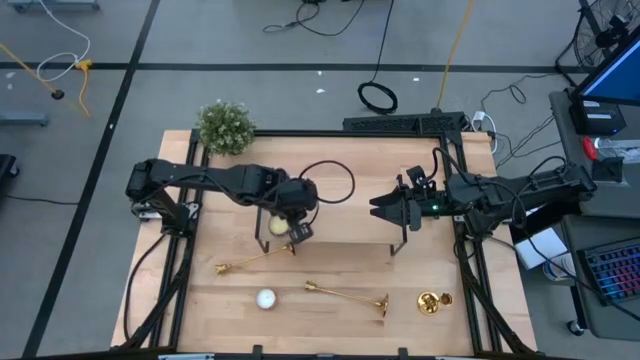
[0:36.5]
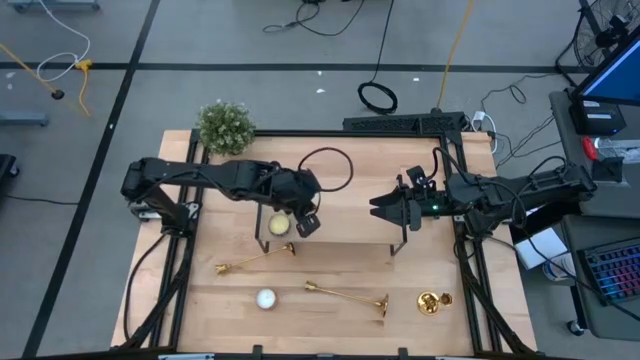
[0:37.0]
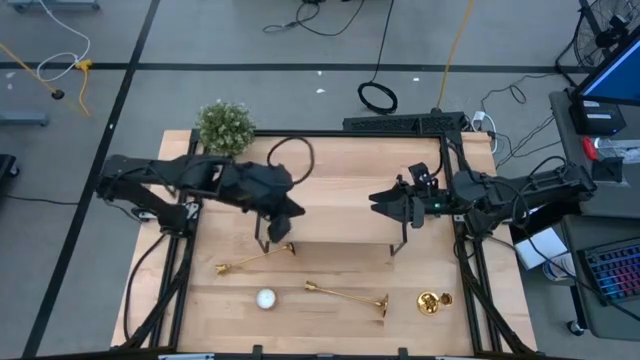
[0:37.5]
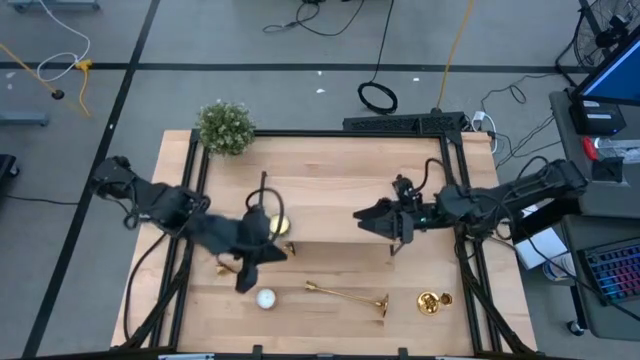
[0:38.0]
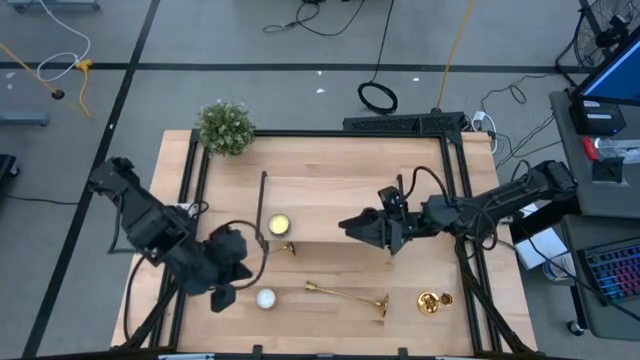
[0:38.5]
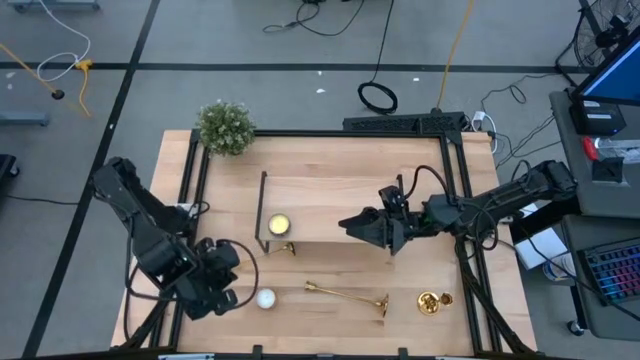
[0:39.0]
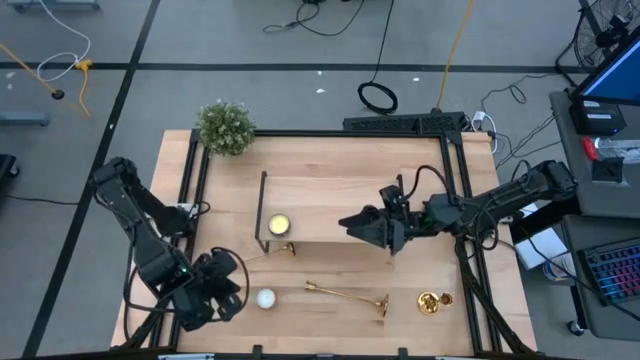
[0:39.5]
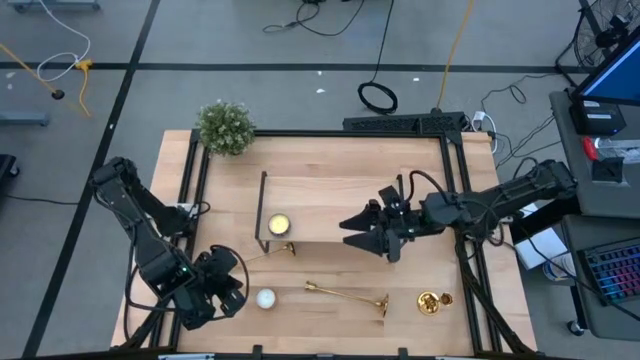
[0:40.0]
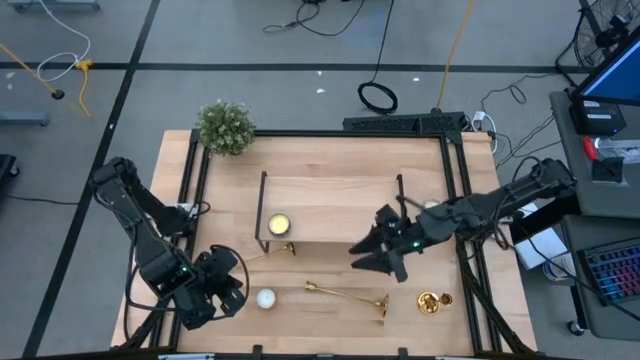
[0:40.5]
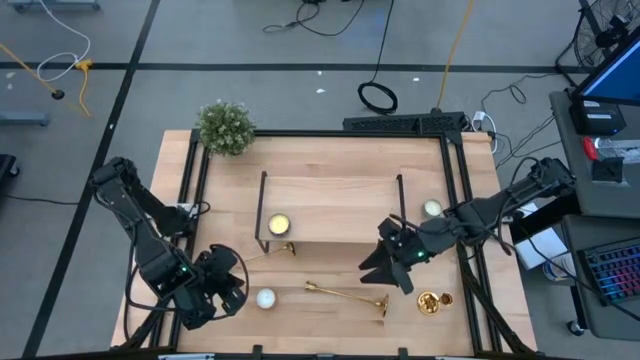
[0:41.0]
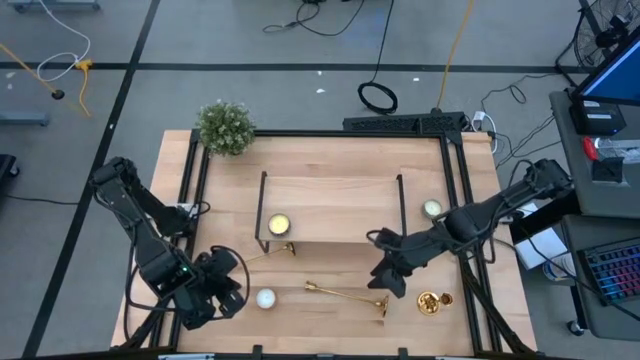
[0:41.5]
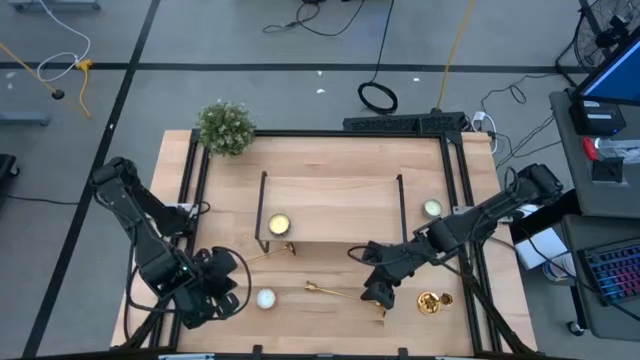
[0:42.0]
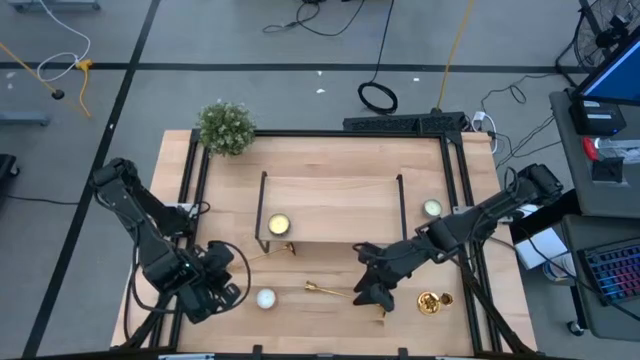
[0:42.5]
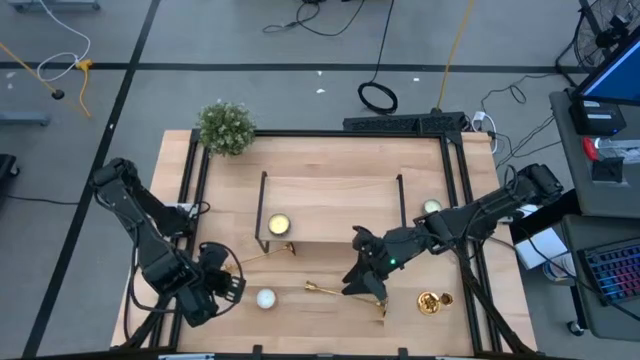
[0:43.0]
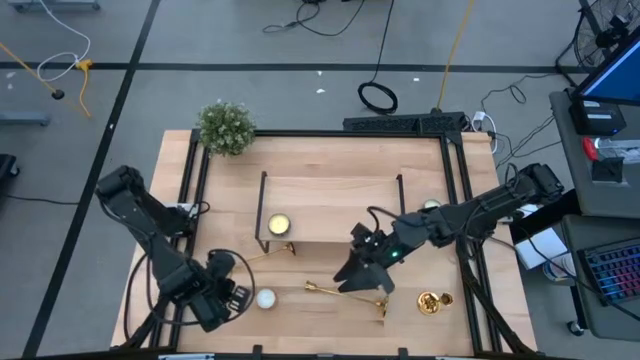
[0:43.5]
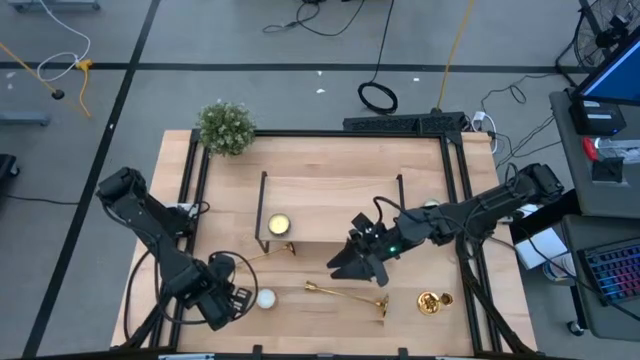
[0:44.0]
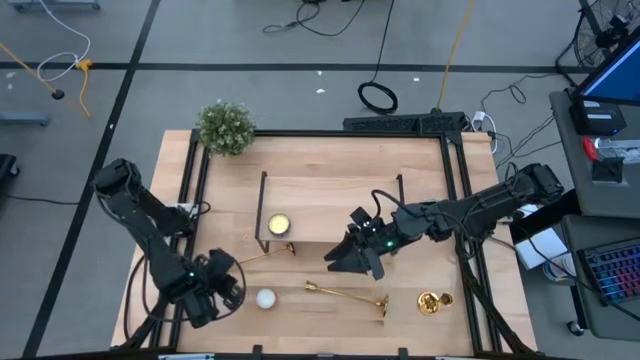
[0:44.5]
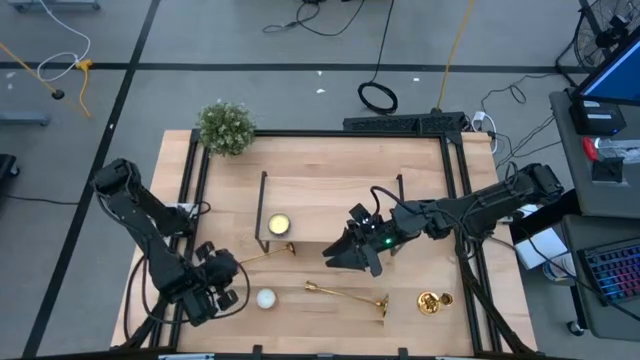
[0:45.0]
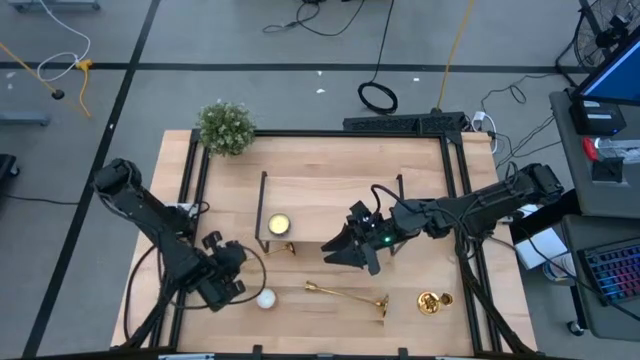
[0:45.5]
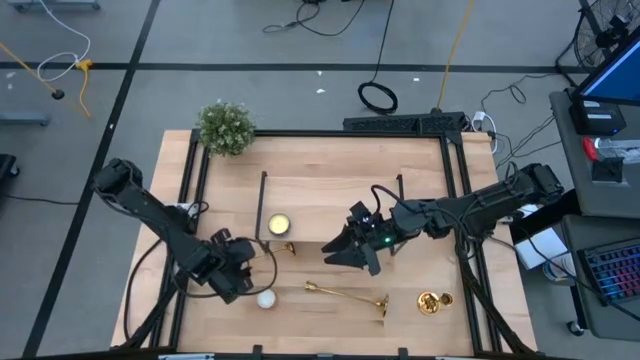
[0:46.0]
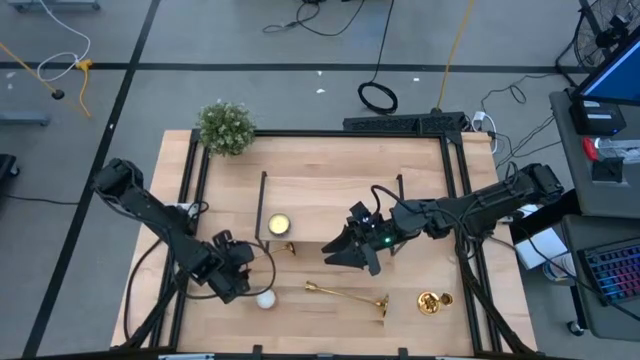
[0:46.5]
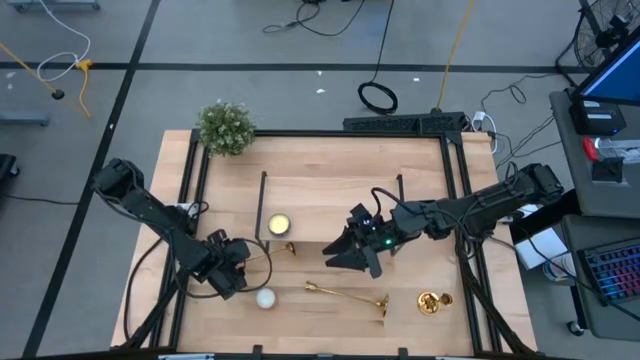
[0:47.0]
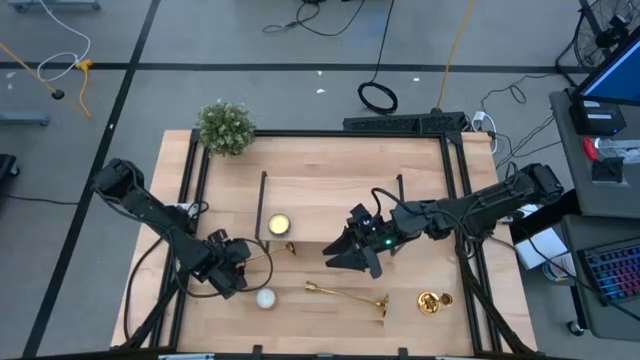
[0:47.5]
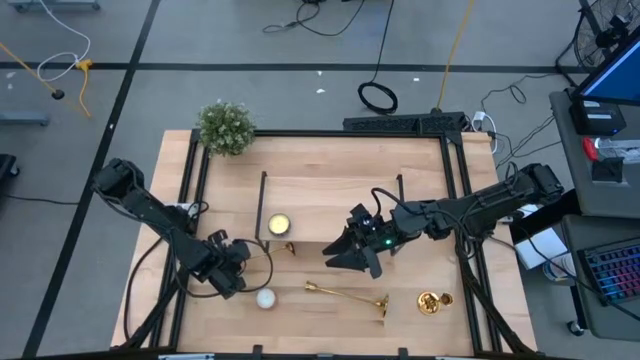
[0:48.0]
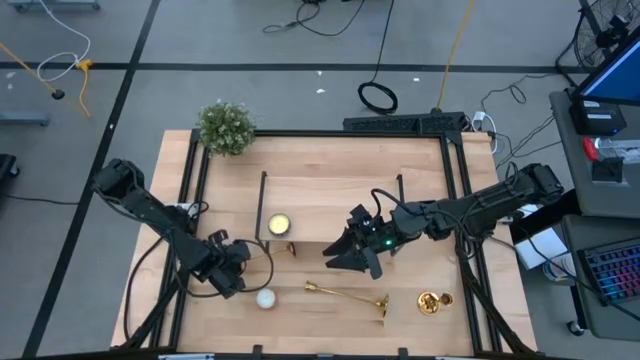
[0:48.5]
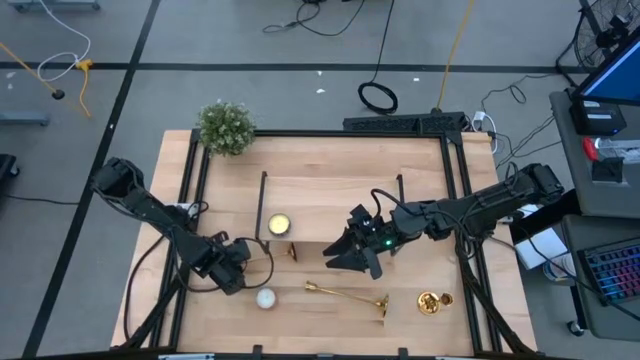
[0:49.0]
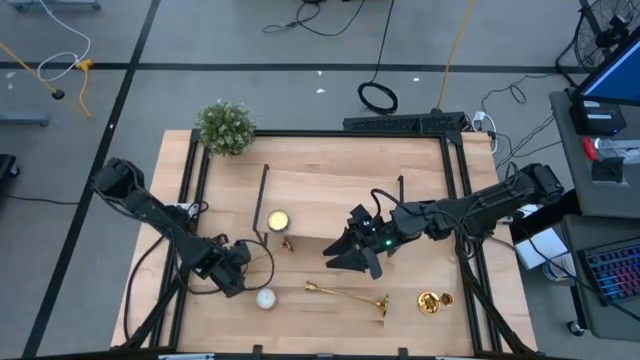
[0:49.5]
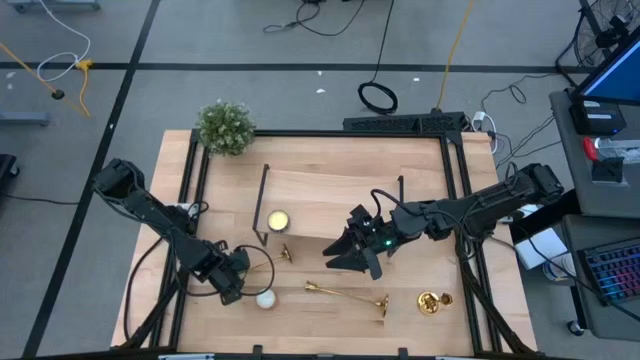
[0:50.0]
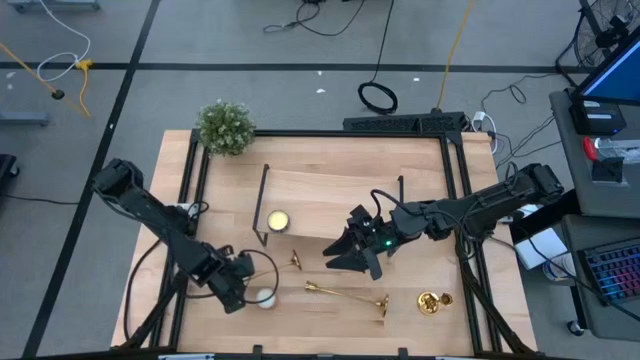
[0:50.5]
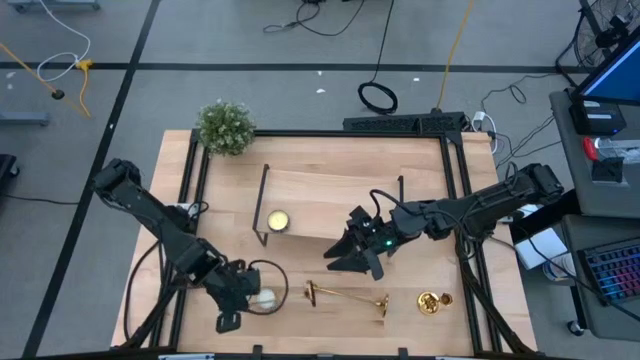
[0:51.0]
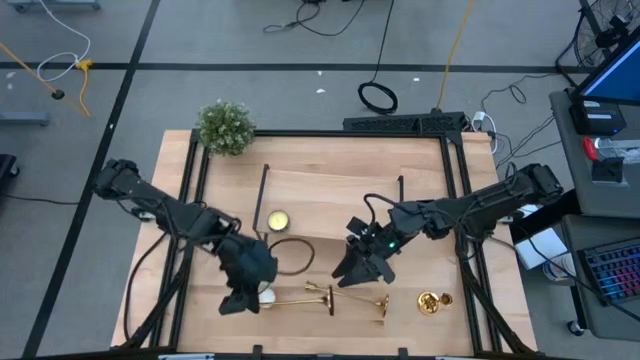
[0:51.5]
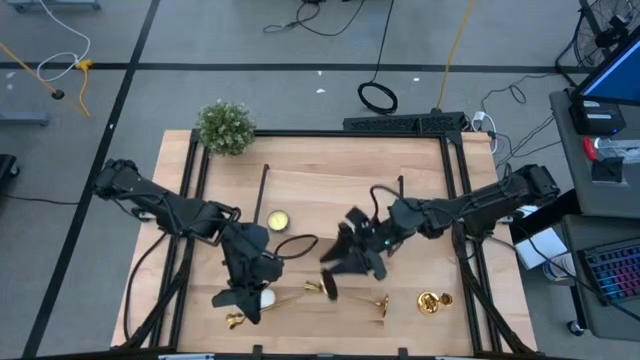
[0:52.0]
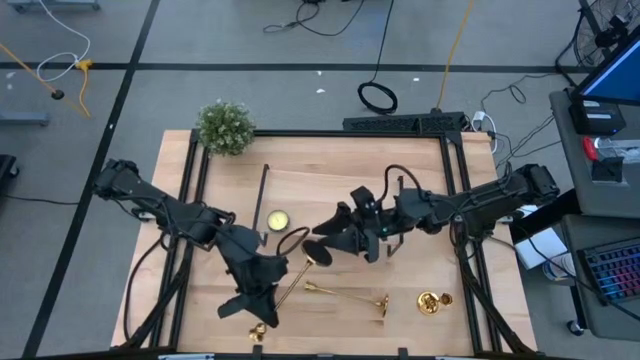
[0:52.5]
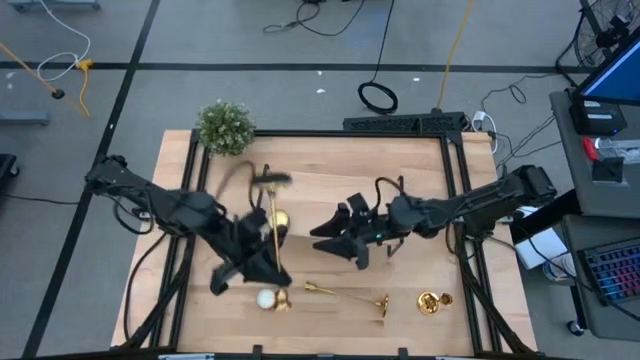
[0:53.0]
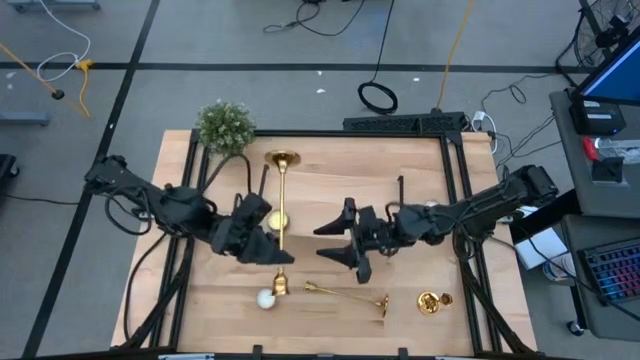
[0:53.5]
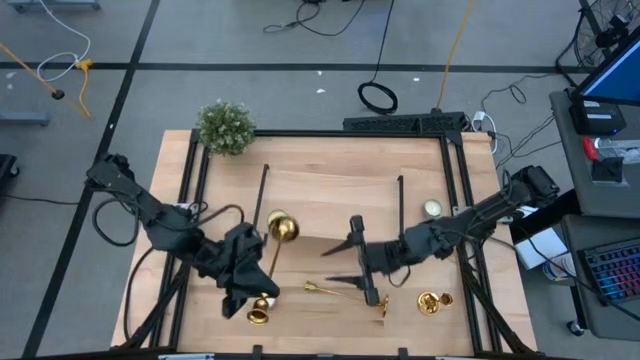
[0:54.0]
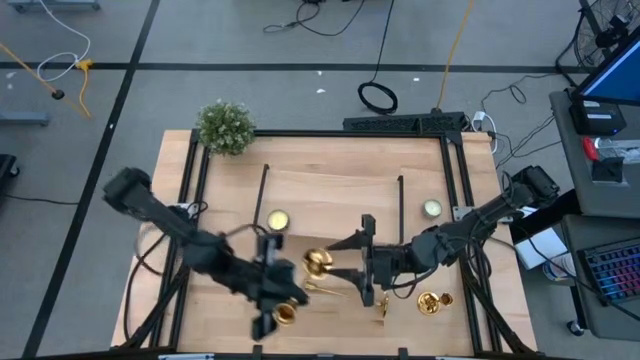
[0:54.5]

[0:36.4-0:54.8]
Task: Pick & Place candle stick holders
Put the left gold candle holder on the shelf
